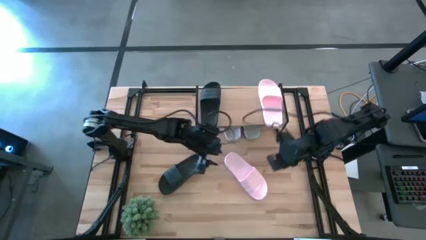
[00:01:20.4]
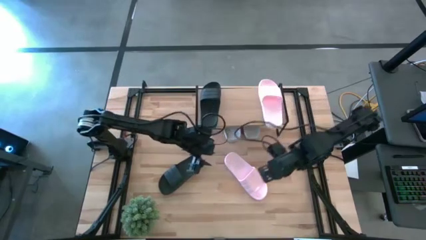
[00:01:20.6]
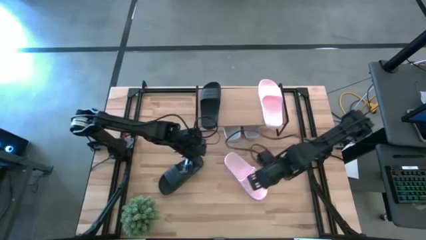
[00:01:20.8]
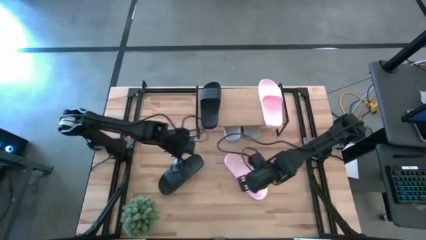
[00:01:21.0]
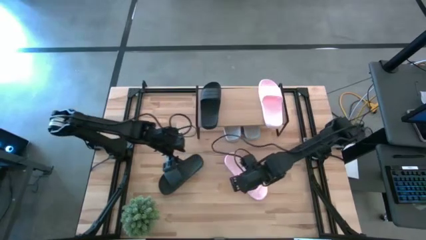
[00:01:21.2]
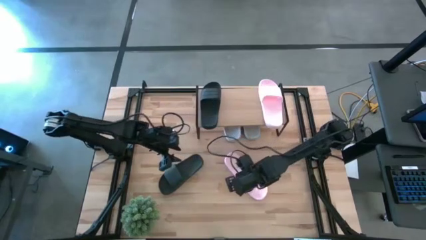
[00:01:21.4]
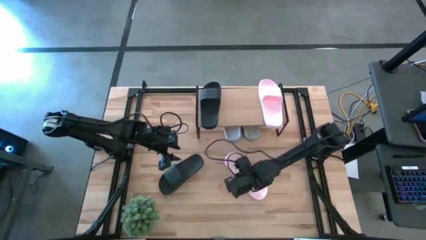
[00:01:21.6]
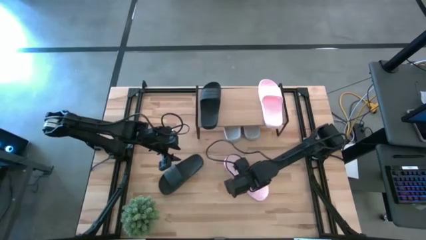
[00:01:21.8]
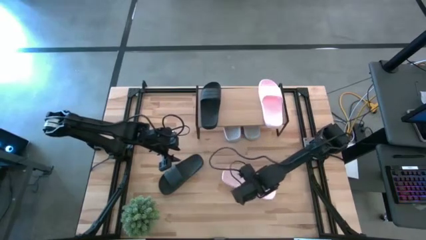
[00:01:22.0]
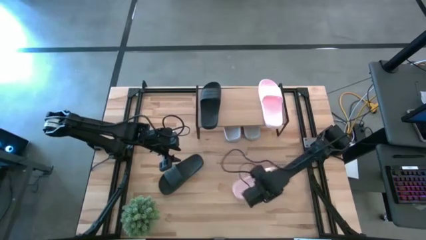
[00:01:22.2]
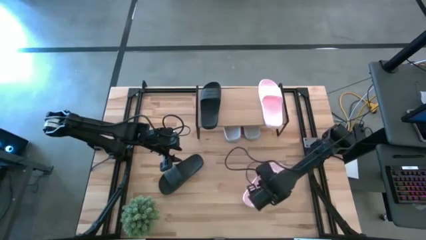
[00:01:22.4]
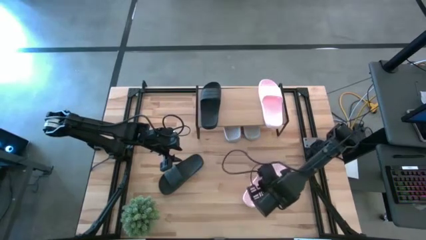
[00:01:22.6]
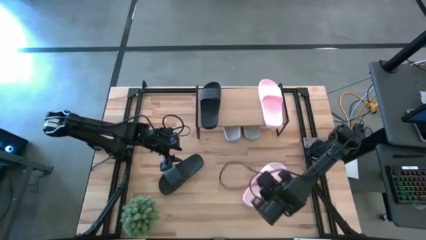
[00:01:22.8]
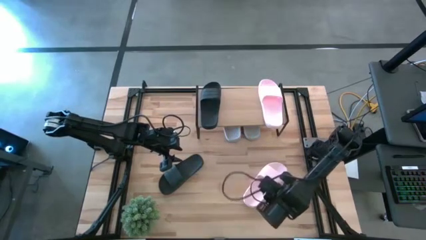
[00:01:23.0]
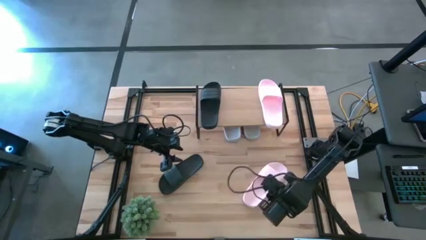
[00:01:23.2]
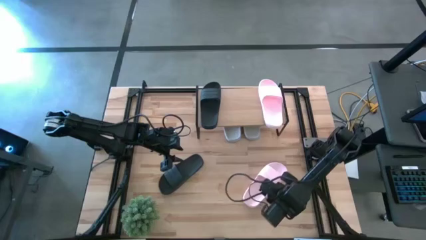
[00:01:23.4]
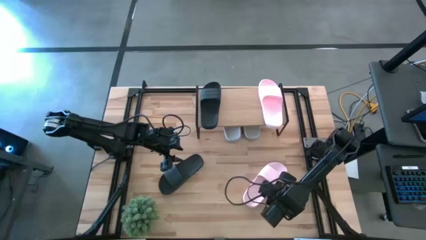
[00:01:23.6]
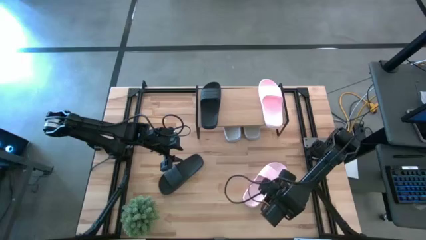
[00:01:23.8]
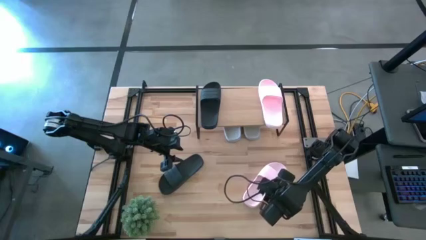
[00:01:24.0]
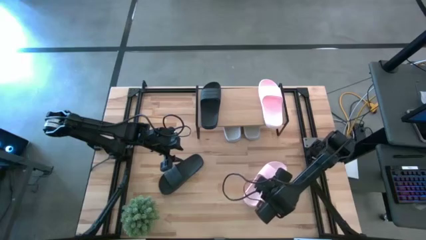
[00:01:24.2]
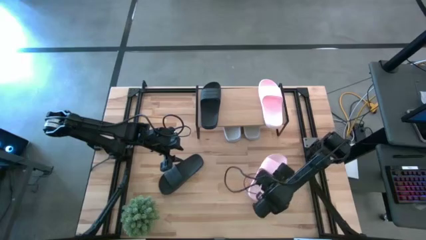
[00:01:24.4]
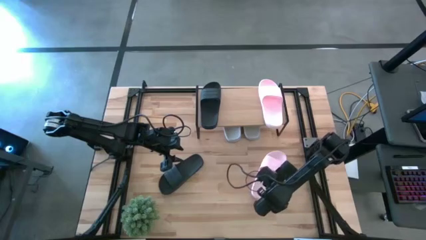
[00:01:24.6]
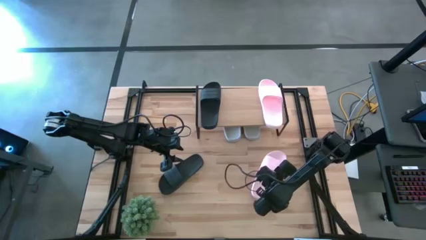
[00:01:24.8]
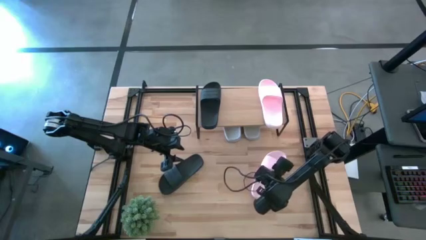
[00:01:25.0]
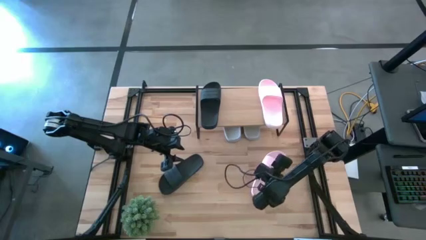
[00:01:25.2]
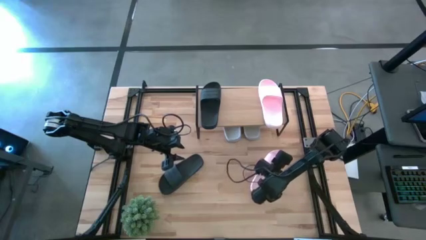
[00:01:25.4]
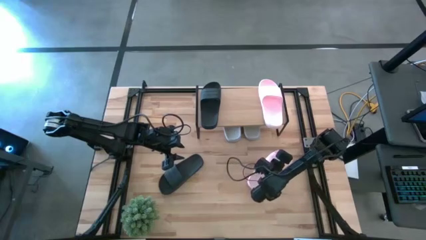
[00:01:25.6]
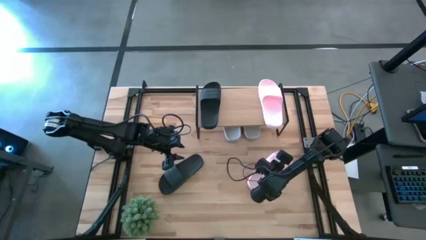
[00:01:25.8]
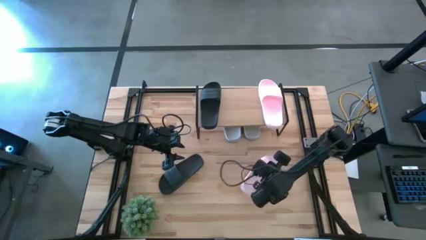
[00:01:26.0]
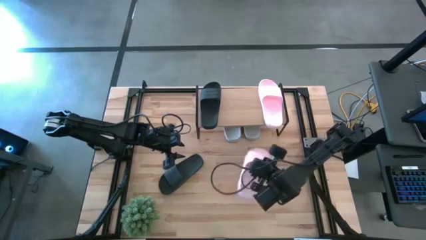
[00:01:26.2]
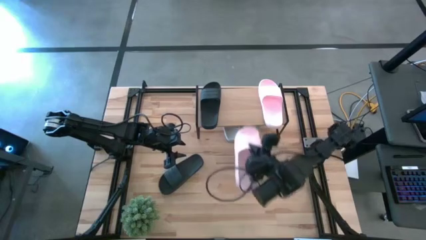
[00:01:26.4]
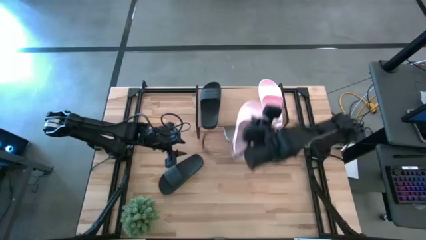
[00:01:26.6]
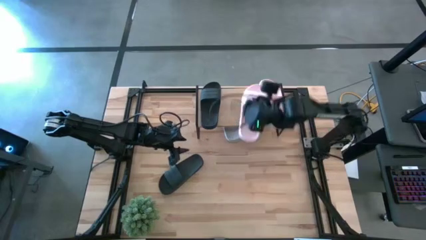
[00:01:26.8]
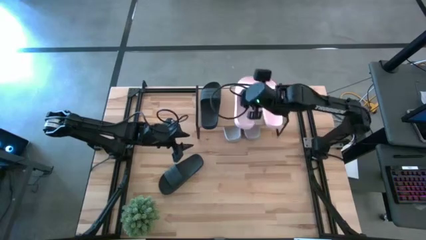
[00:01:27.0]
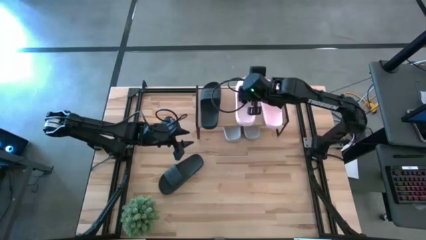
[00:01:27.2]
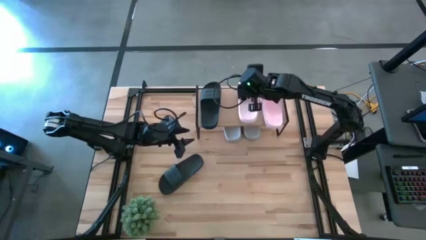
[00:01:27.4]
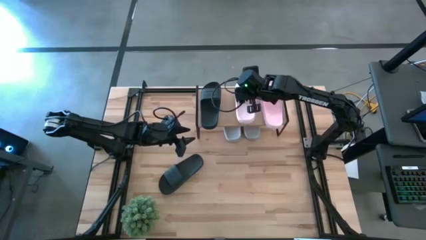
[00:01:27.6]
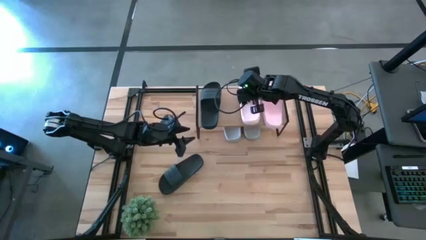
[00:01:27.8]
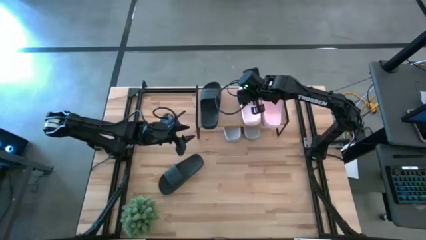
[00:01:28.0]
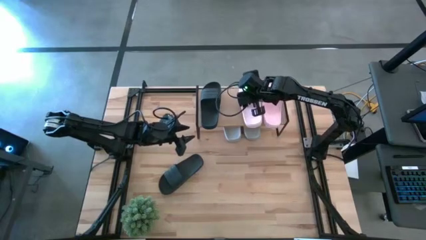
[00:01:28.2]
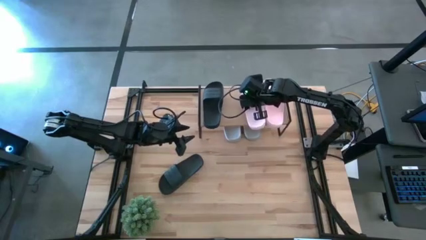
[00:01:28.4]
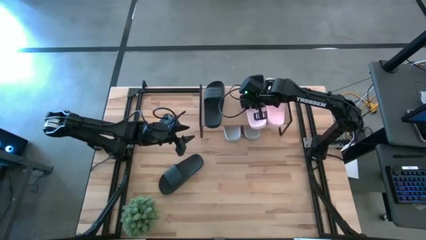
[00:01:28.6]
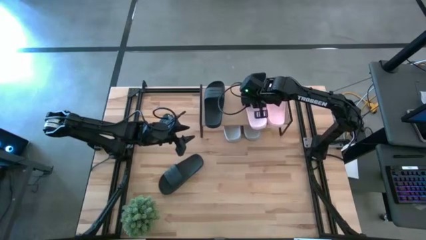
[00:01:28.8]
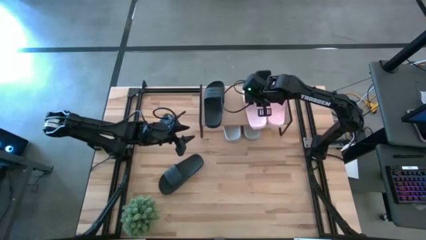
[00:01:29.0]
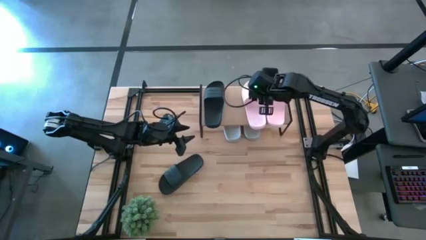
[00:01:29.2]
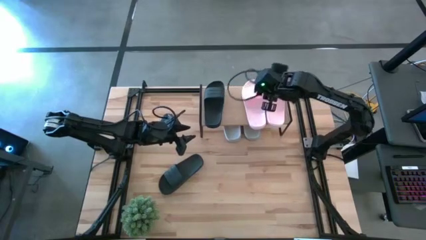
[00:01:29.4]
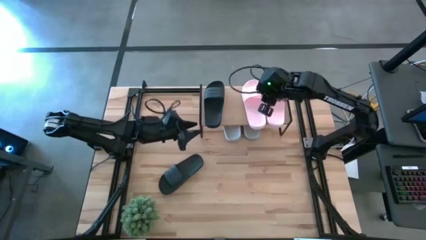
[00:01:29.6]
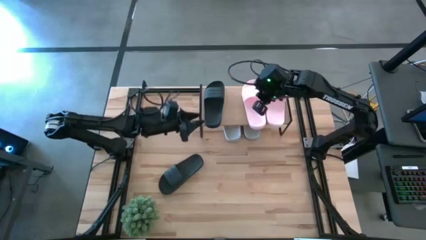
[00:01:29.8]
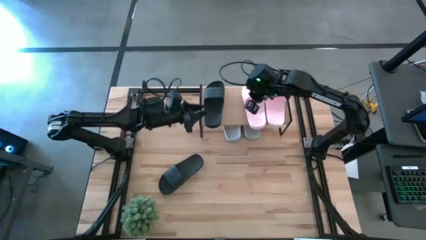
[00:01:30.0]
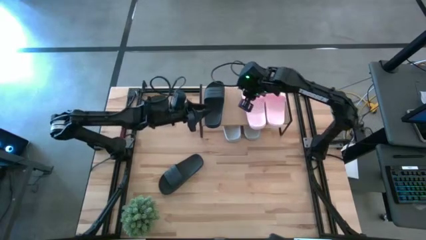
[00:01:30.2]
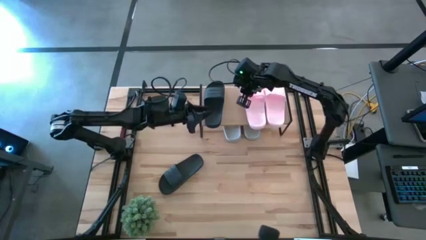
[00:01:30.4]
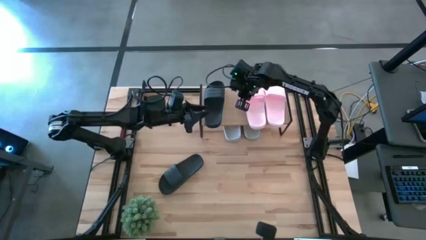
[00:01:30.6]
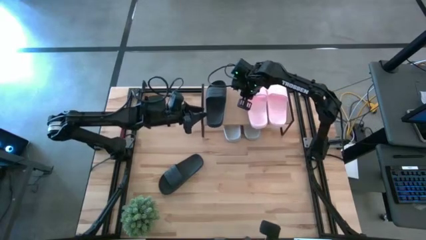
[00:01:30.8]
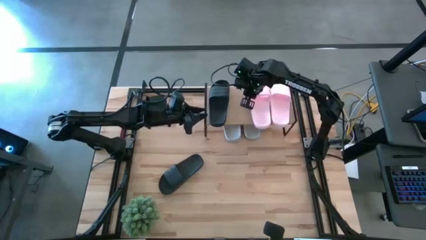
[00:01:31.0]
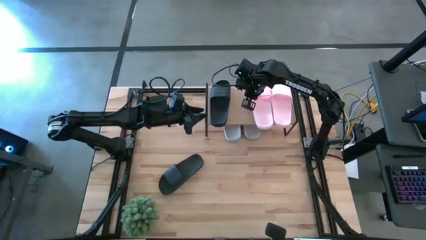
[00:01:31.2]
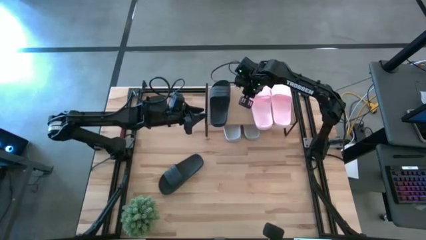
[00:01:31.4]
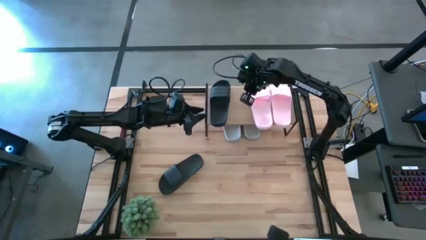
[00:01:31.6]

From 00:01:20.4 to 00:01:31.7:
Task: Pick and place slides into the shelf
Put the pink slide on the shelf

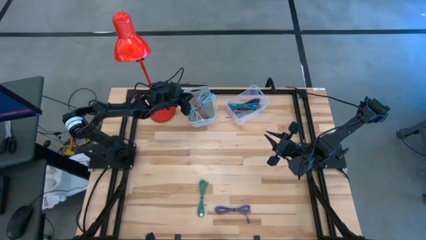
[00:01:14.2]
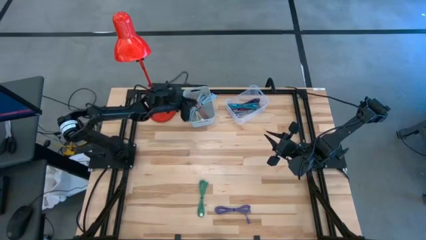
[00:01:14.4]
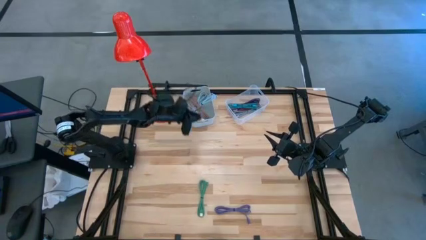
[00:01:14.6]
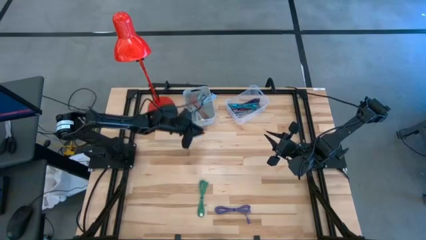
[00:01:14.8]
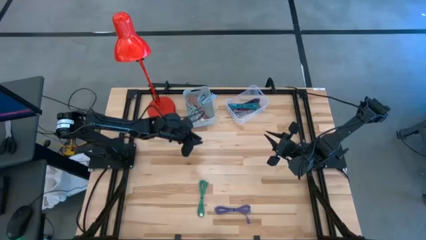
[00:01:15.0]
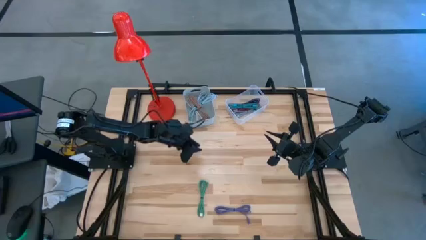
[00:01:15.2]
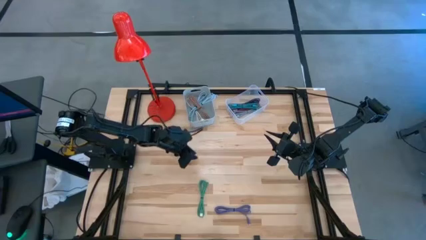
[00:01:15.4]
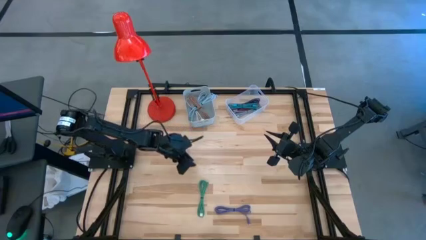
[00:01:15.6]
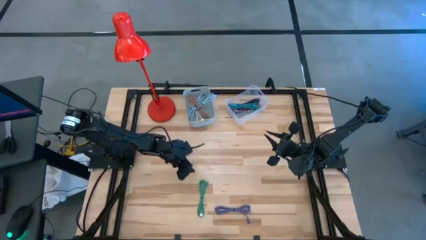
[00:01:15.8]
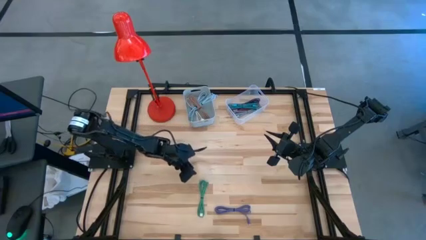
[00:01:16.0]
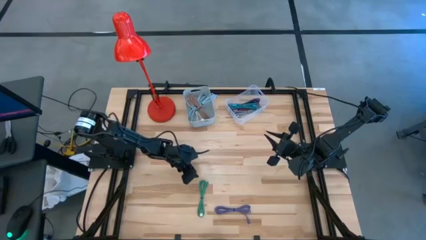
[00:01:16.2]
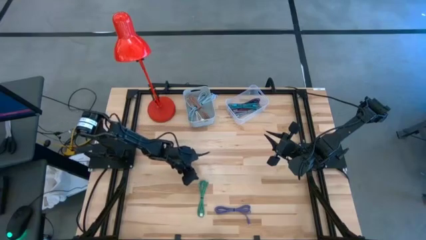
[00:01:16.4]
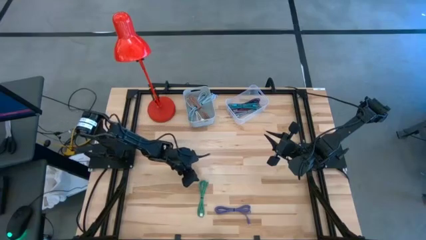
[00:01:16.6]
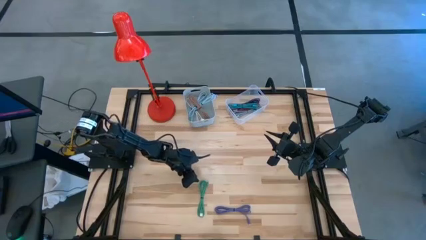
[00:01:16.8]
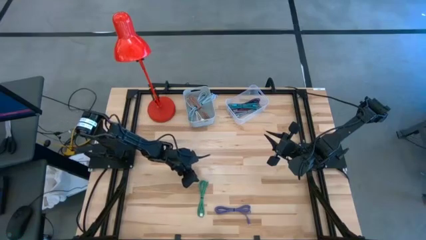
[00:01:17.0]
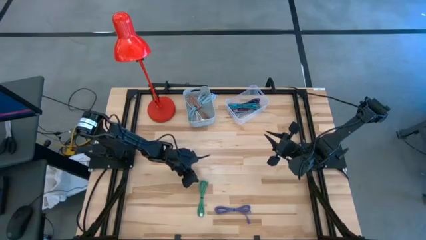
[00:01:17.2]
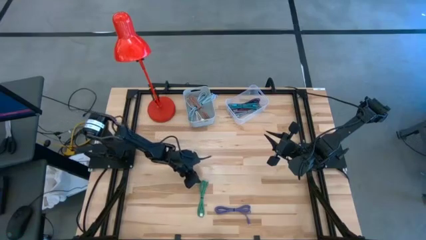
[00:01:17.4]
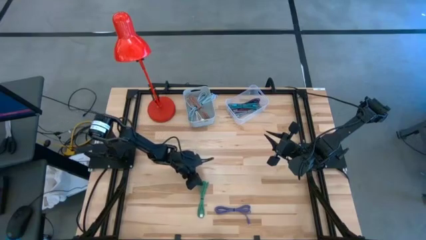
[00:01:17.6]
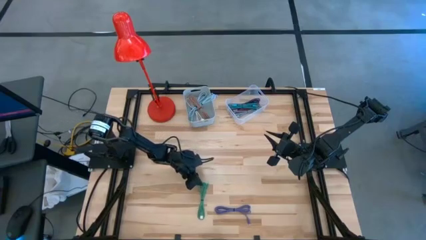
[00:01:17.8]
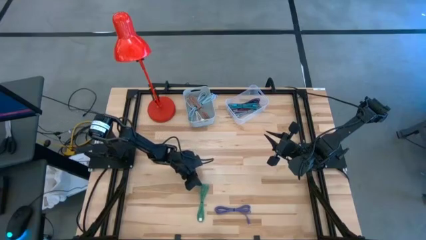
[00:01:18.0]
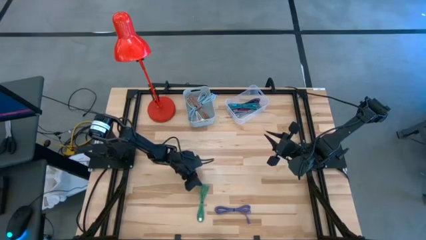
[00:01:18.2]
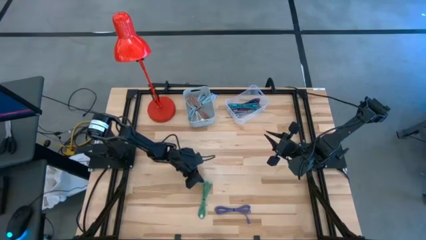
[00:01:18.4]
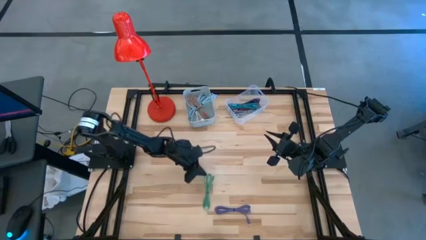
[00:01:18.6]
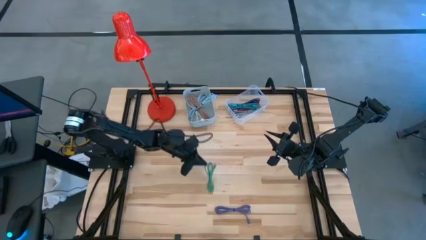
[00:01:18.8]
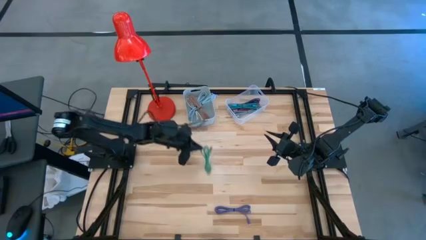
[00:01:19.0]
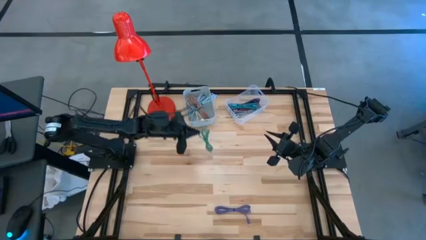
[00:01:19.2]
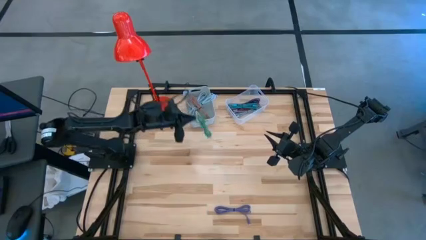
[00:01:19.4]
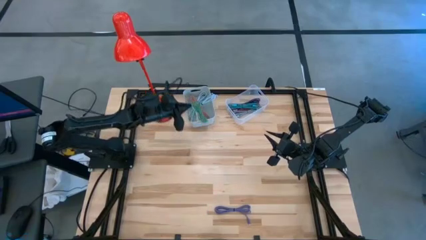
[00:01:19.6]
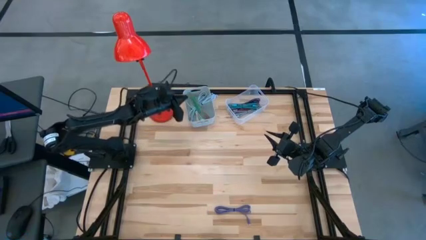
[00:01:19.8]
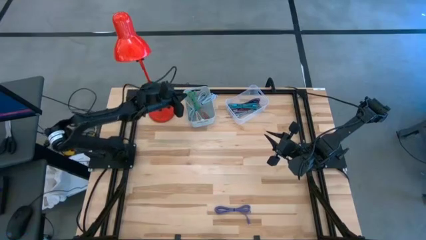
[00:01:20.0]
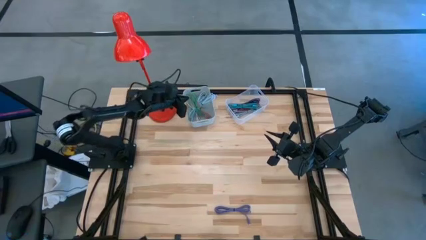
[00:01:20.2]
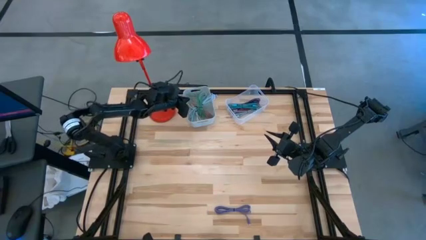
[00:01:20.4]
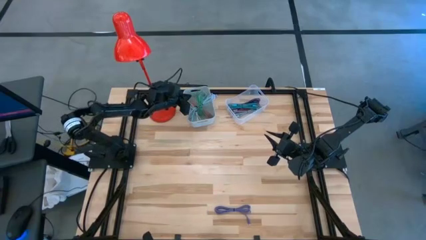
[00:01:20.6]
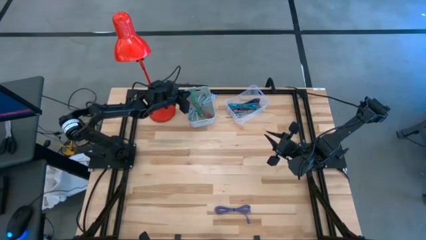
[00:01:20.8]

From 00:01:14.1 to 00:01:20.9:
Task: Pick & Place USB Port
Put the green charger cable into the gray bin
